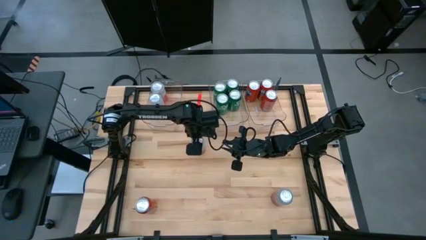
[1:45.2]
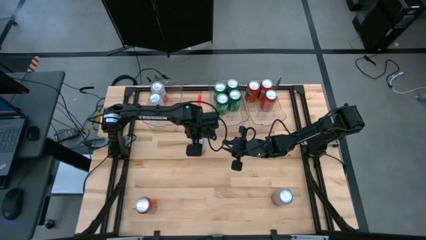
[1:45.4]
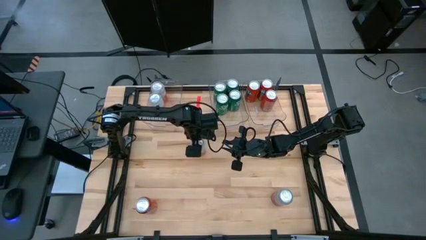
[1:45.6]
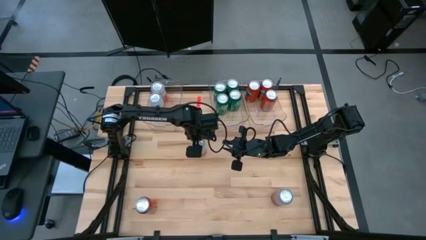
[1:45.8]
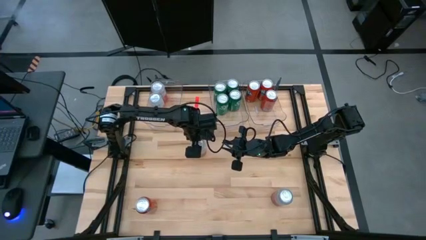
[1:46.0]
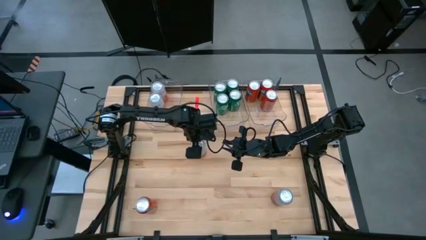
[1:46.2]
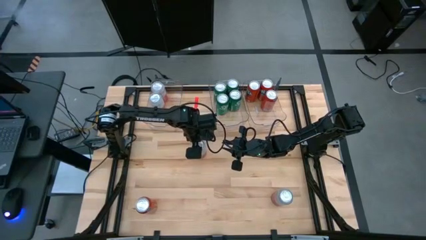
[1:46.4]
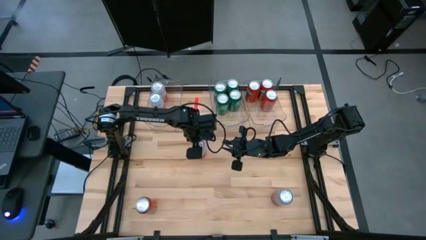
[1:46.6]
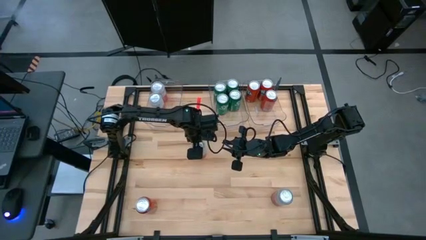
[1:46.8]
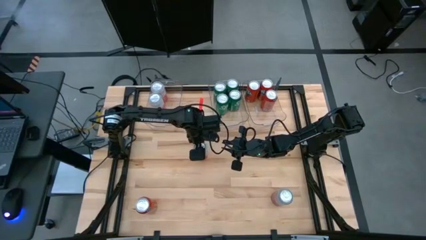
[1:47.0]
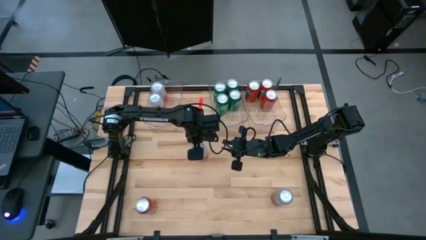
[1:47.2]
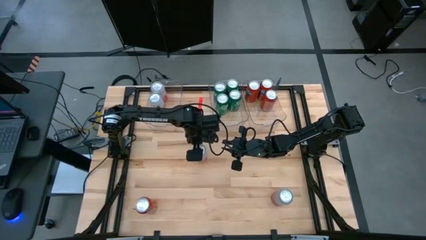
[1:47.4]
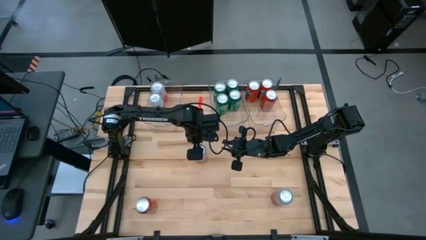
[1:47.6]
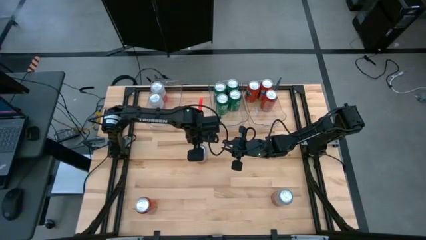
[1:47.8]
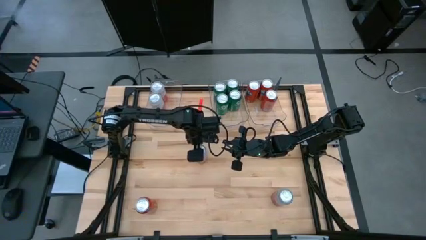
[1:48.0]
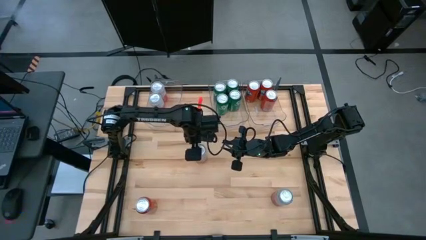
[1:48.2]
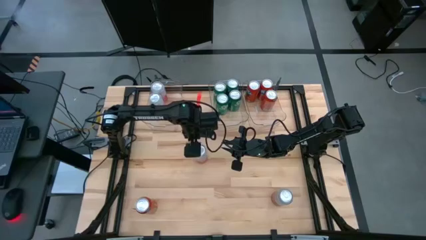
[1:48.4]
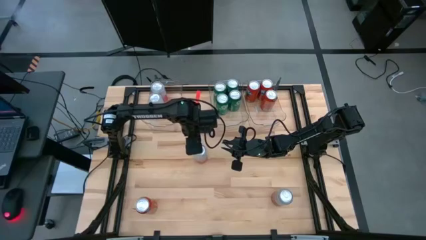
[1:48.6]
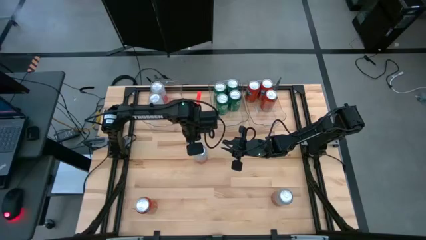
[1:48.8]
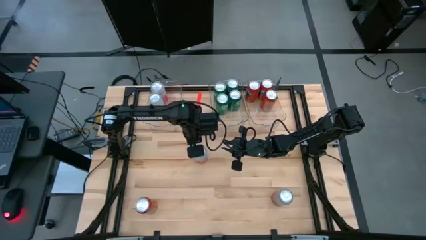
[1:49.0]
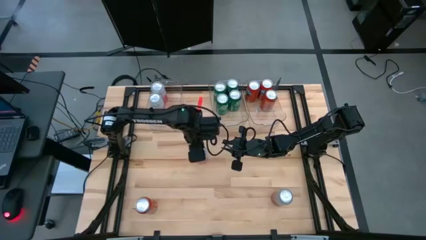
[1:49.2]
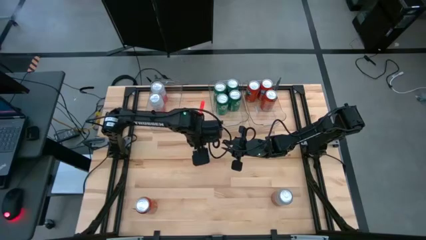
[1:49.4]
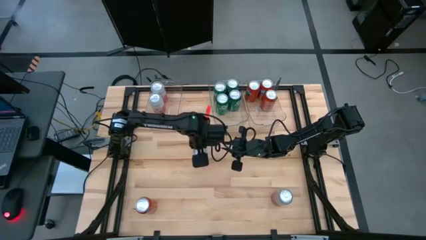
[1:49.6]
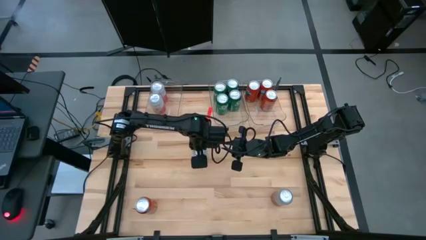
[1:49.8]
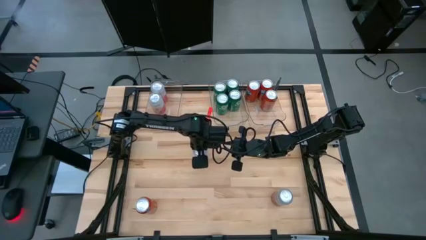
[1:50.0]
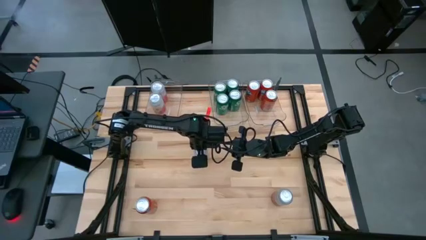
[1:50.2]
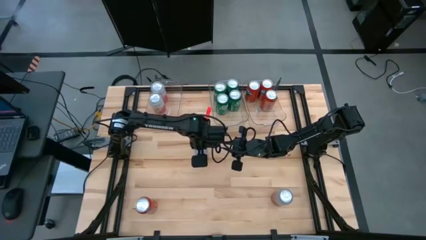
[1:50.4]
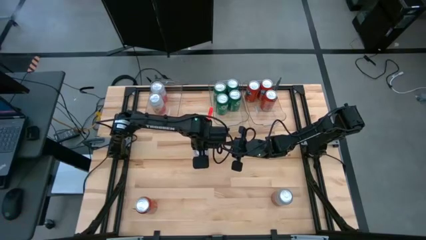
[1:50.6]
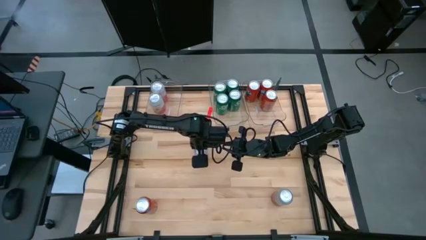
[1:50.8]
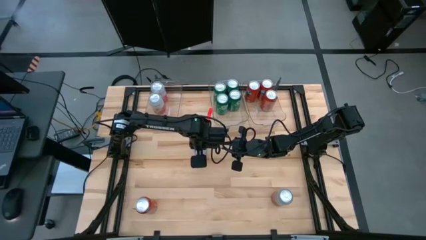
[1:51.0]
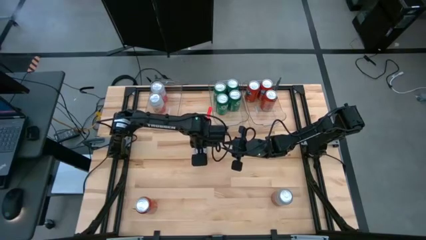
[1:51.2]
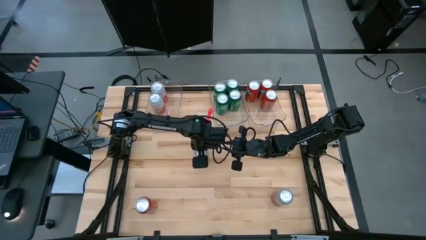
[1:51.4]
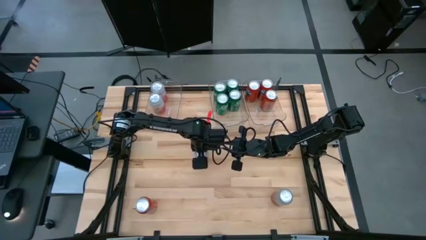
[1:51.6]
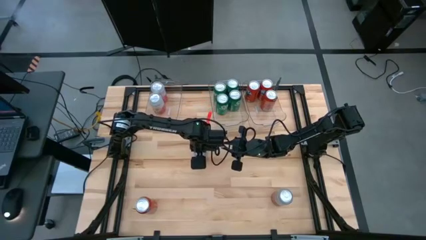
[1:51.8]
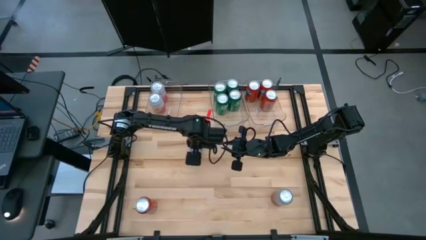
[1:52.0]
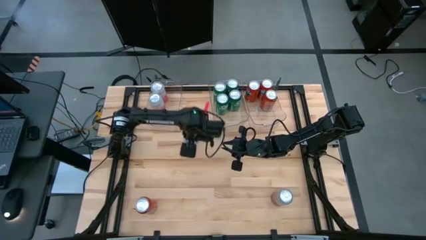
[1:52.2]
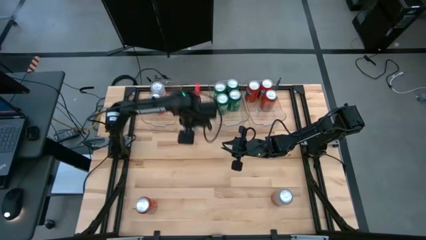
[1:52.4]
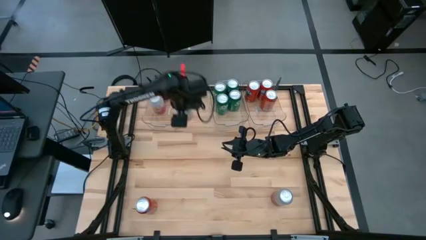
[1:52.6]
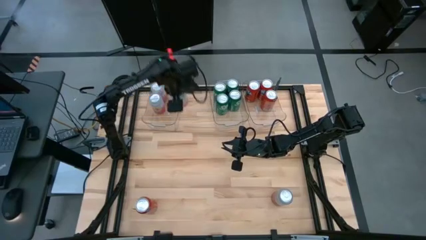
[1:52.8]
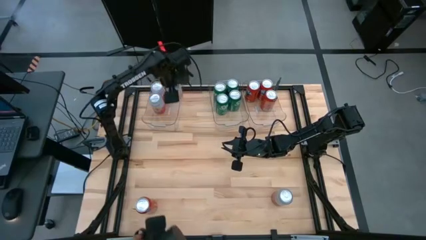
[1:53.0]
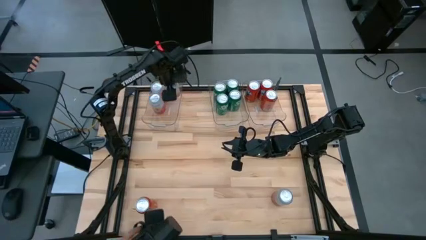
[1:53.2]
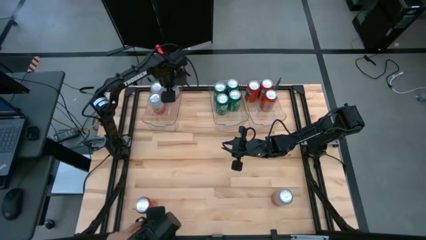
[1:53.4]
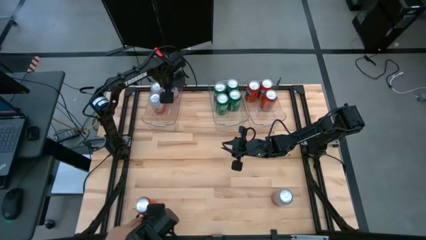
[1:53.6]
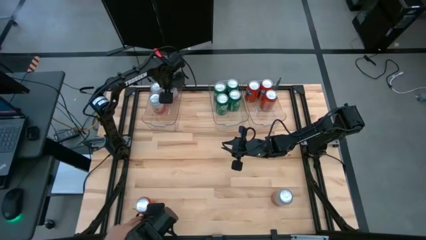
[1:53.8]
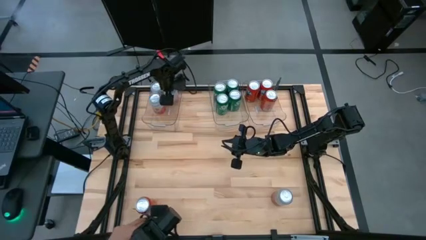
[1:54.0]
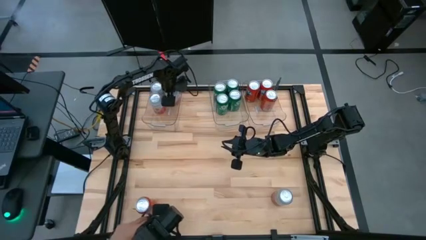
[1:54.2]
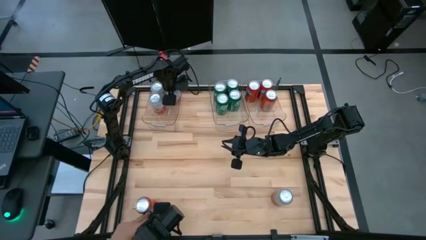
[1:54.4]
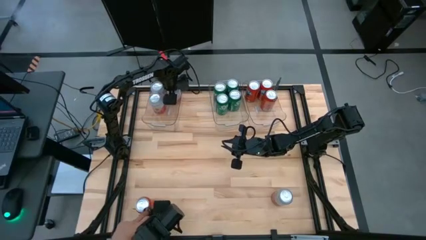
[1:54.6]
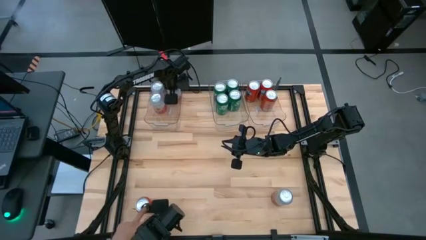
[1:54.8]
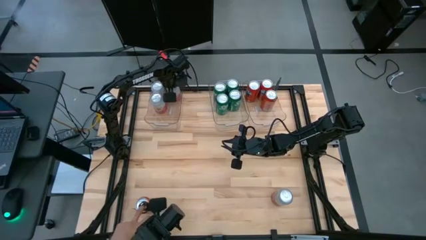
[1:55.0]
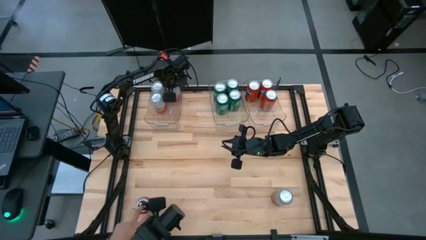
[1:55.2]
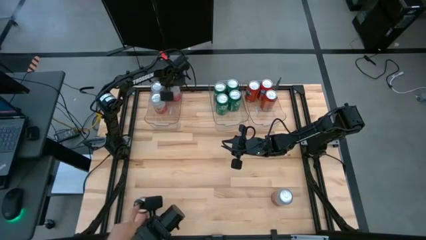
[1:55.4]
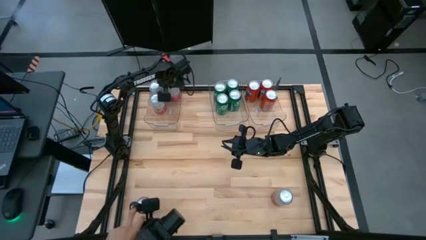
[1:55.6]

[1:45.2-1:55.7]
Task: Sort soda cans
Put the top pink-white soda can into the left transparent bin

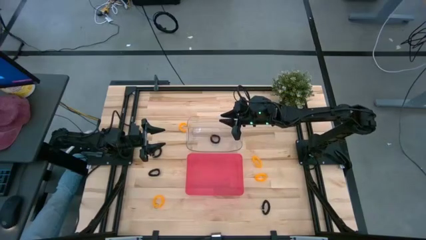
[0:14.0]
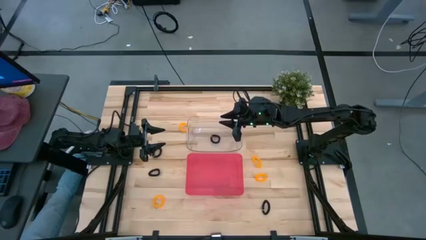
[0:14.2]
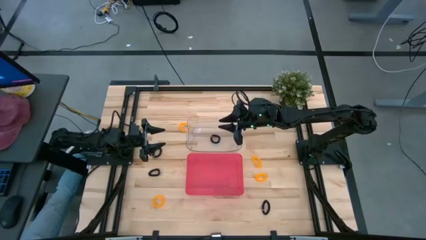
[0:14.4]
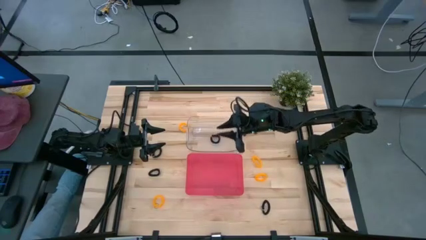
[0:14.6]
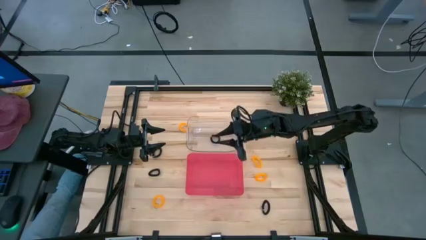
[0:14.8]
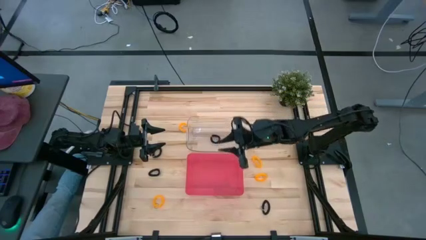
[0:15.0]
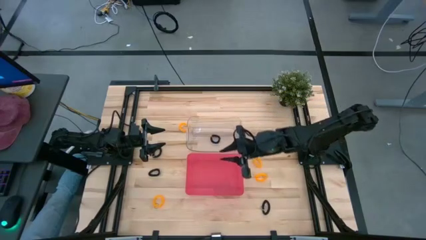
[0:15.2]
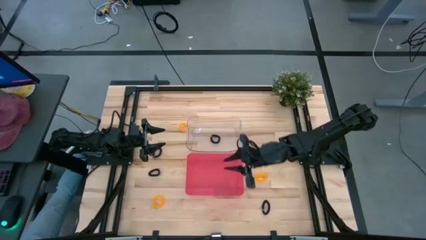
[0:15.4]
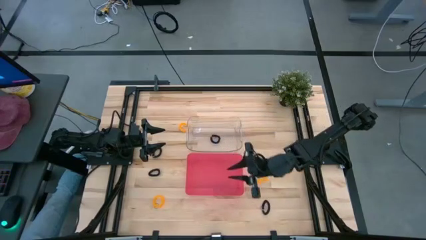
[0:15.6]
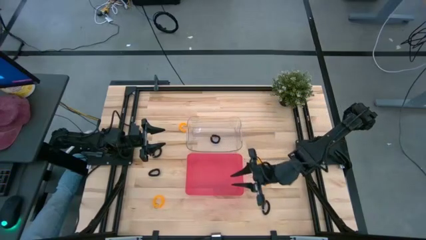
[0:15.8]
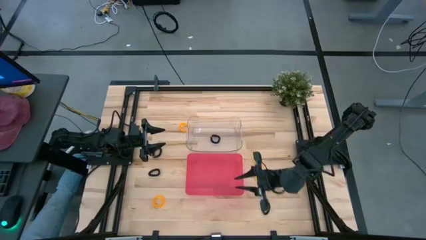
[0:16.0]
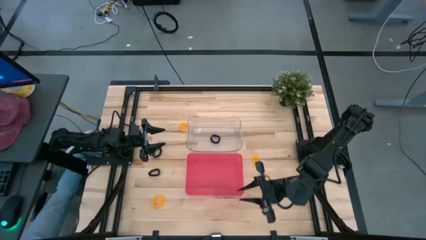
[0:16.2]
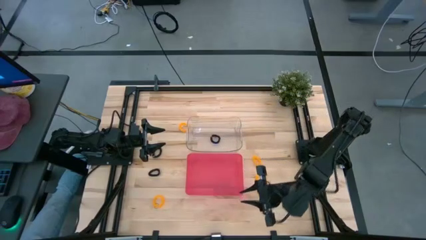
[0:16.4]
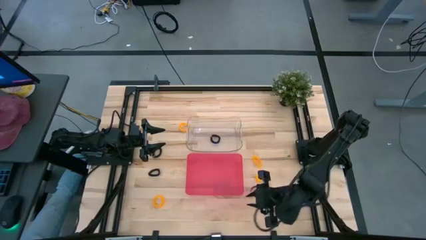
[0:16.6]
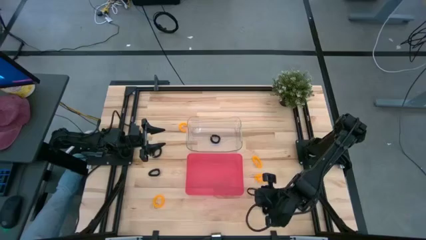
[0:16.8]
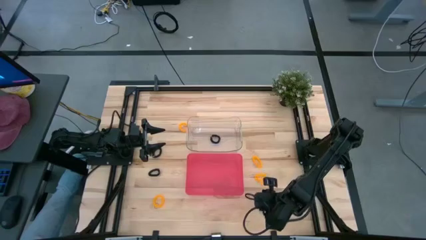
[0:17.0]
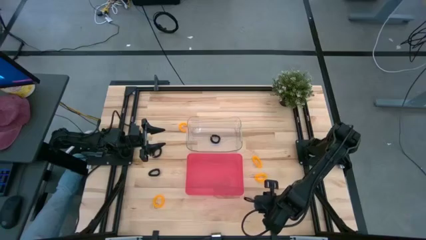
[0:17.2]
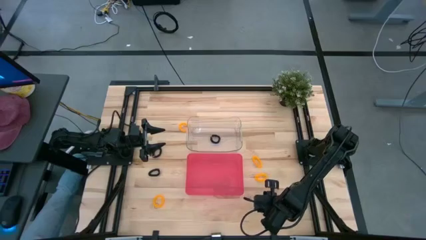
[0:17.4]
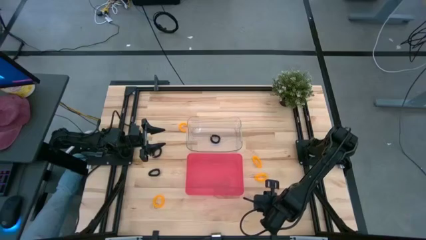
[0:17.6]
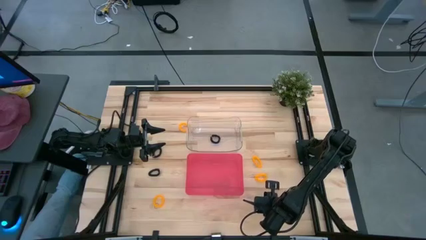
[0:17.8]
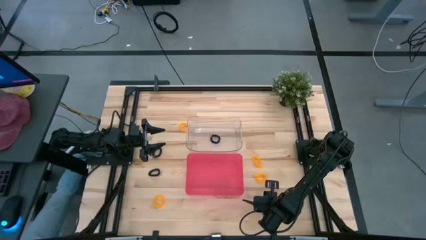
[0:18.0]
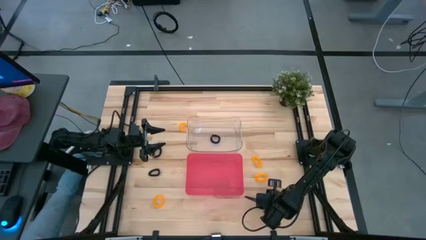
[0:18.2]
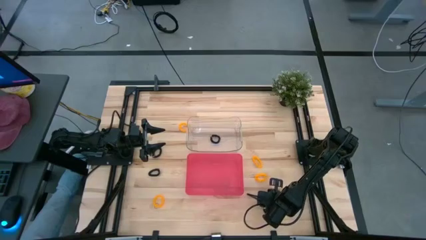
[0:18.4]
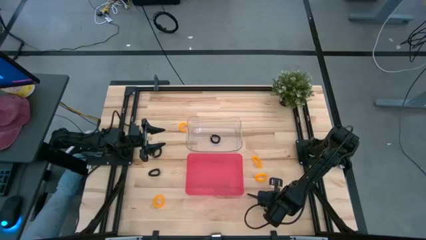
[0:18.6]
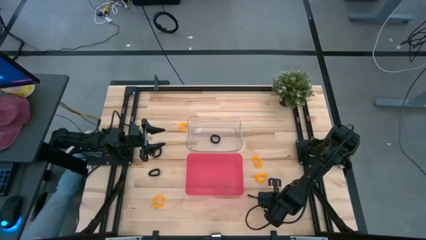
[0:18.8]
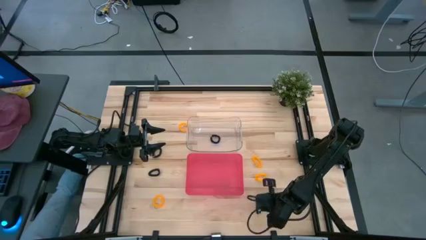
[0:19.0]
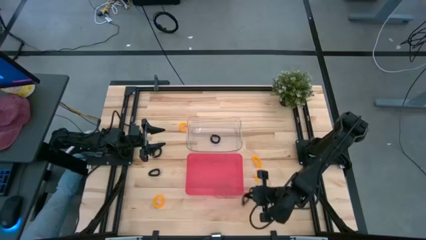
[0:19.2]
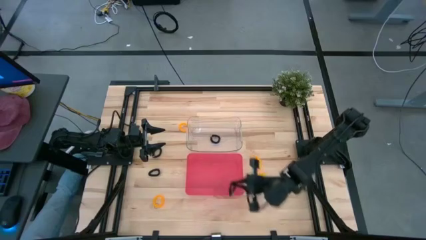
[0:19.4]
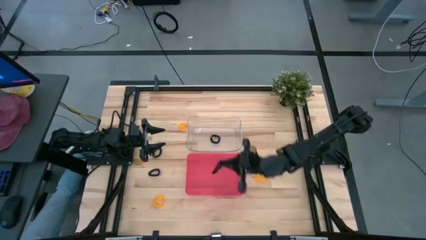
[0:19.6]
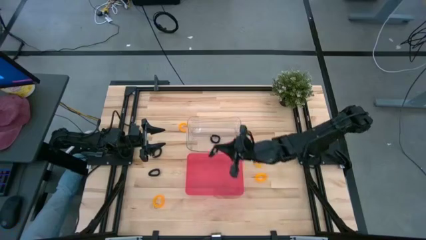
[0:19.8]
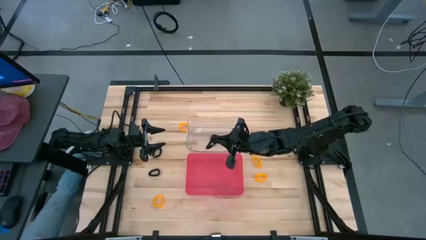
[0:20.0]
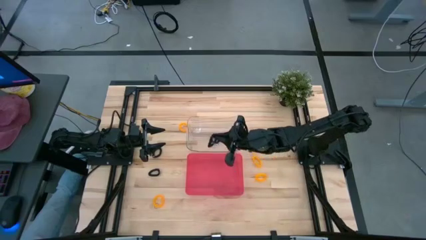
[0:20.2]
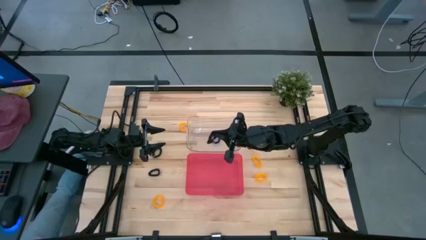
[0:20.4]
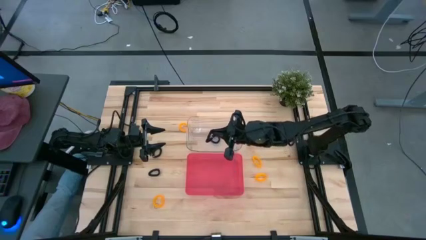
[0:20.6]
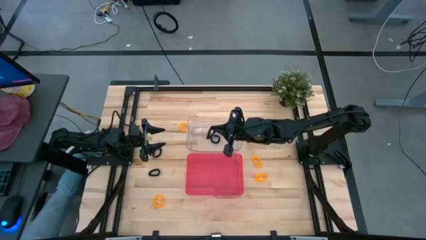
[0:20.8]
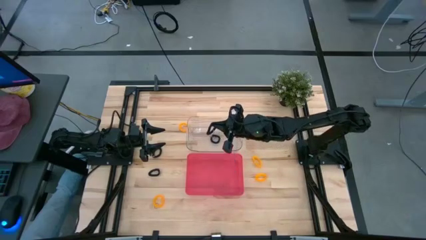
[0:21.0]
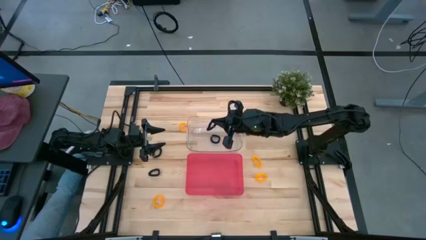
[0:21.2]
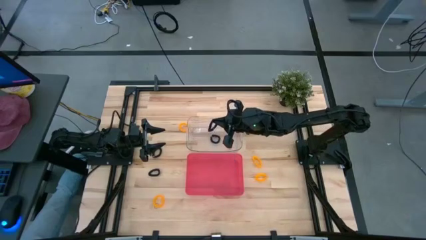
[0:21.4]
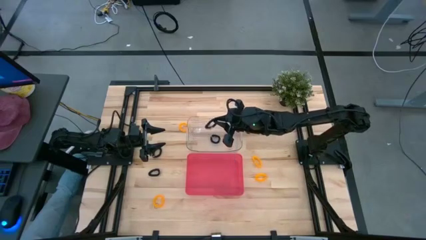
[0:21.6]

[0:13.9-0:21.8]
Task: Sort spring keychains
Put the black spring keychain into the transparent bin
